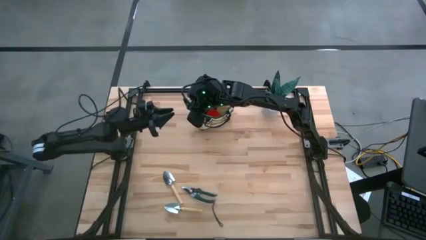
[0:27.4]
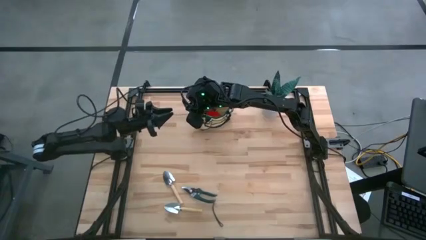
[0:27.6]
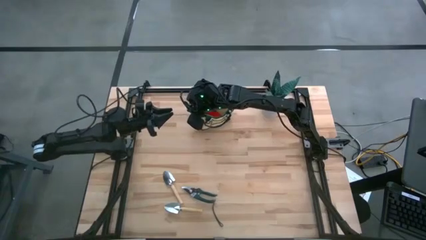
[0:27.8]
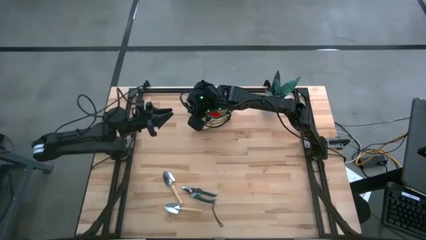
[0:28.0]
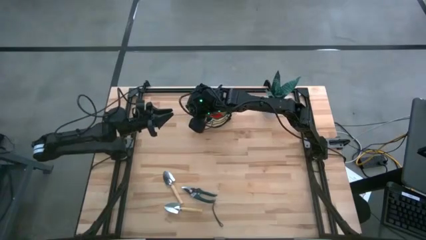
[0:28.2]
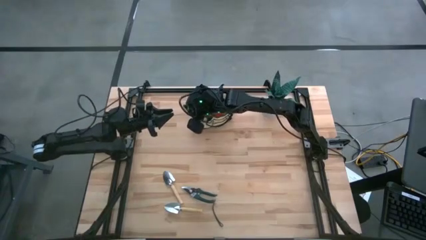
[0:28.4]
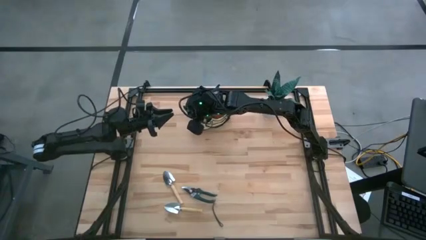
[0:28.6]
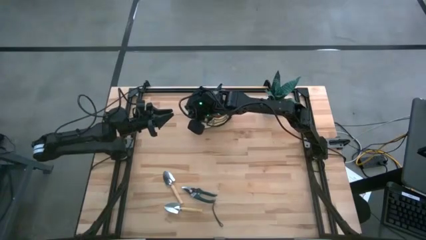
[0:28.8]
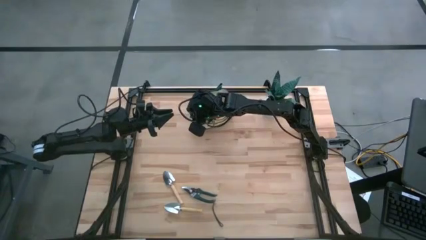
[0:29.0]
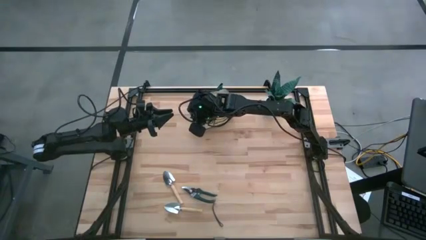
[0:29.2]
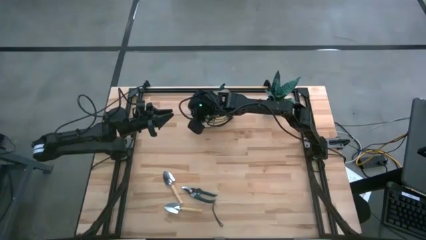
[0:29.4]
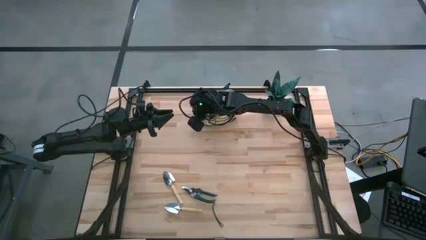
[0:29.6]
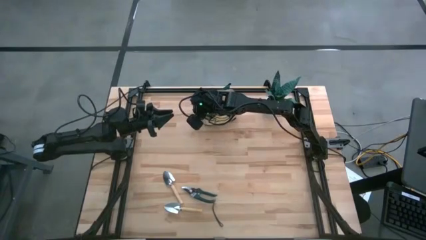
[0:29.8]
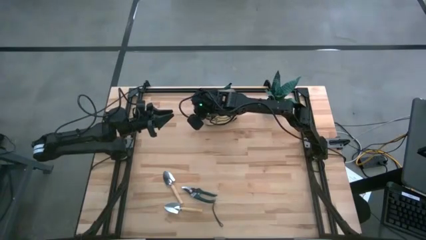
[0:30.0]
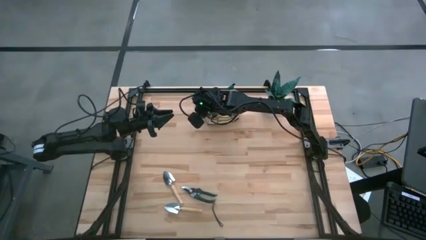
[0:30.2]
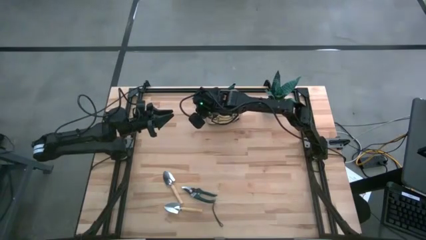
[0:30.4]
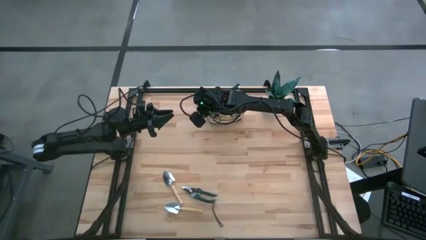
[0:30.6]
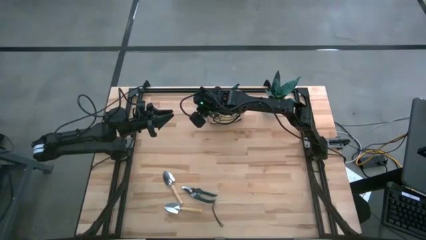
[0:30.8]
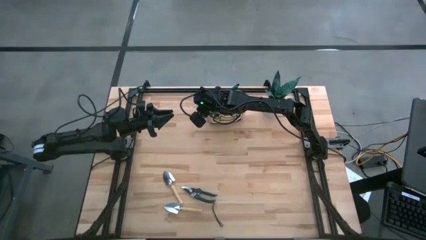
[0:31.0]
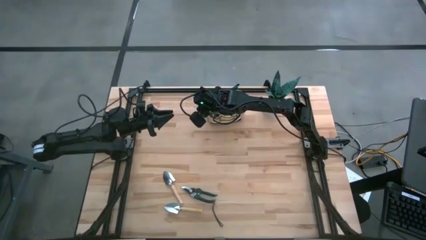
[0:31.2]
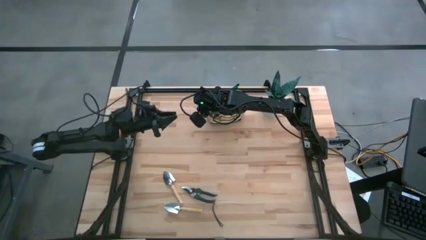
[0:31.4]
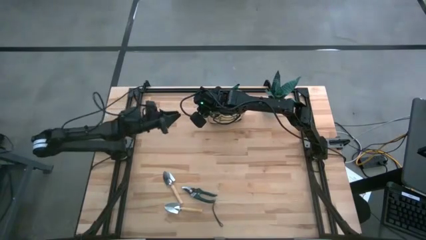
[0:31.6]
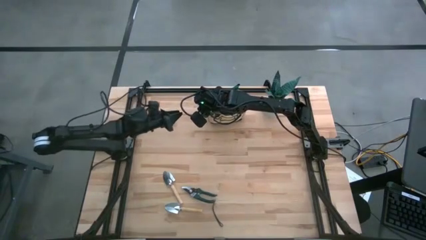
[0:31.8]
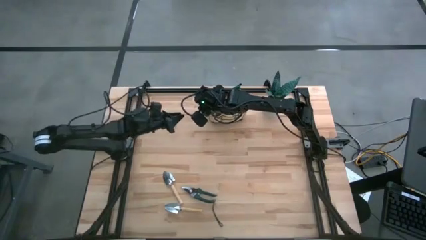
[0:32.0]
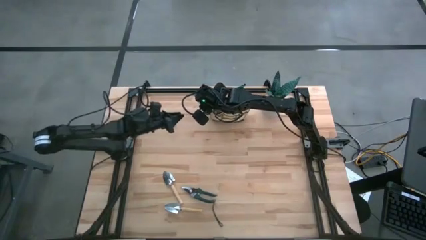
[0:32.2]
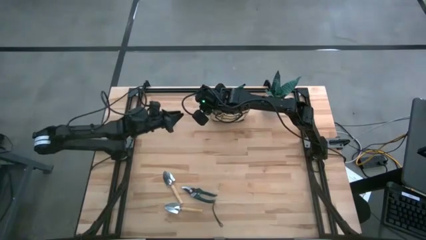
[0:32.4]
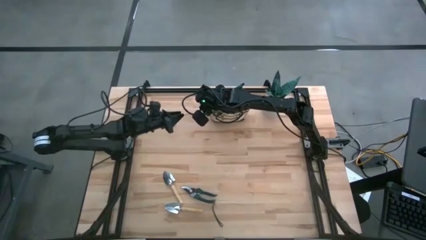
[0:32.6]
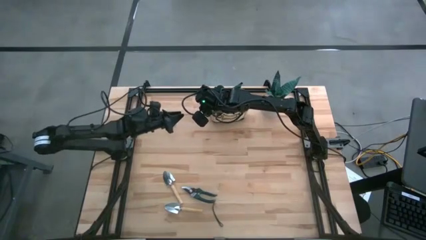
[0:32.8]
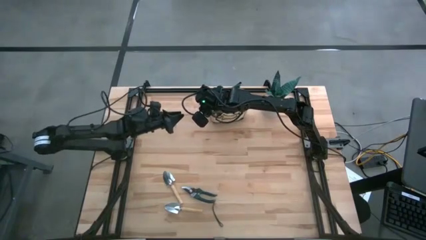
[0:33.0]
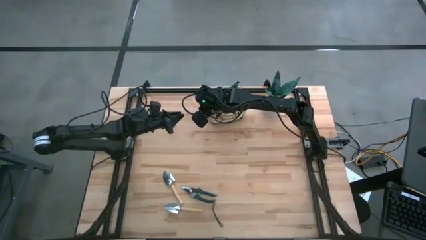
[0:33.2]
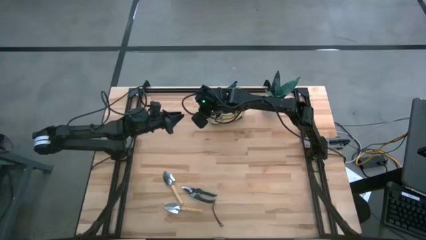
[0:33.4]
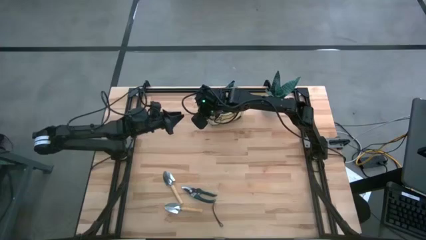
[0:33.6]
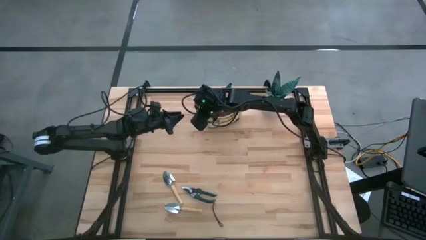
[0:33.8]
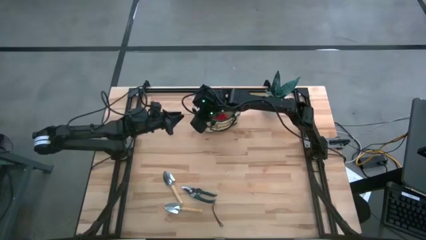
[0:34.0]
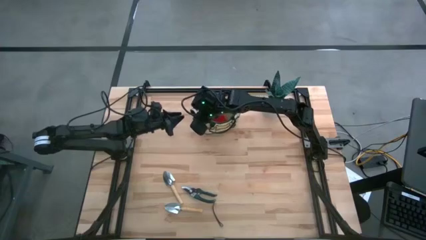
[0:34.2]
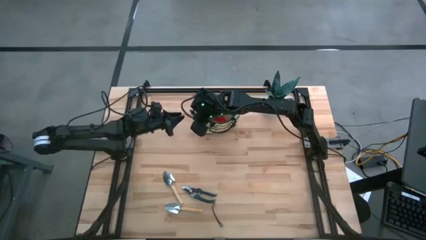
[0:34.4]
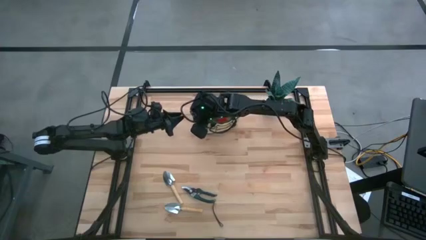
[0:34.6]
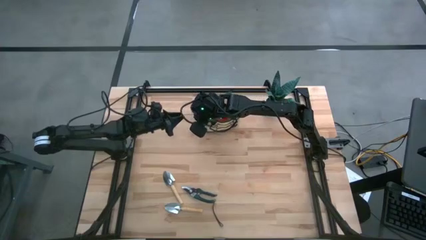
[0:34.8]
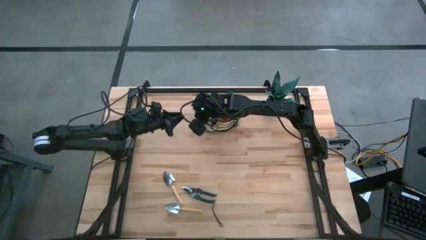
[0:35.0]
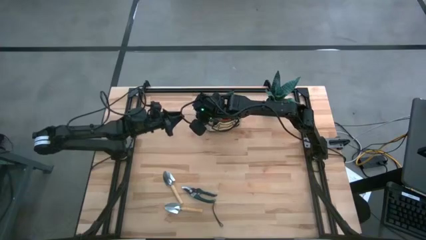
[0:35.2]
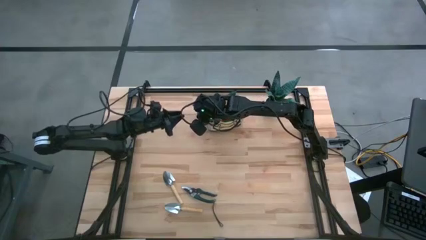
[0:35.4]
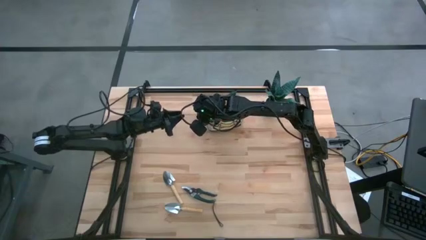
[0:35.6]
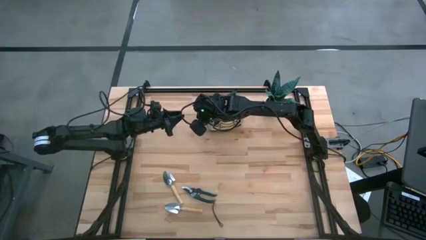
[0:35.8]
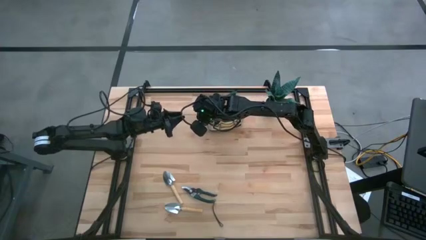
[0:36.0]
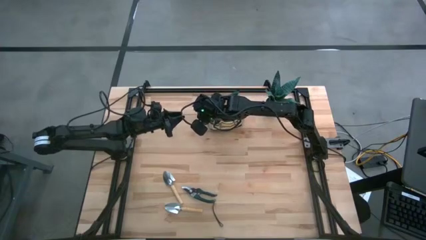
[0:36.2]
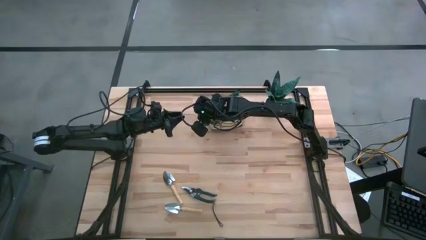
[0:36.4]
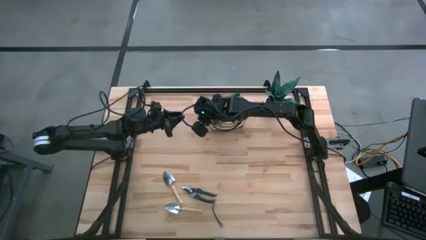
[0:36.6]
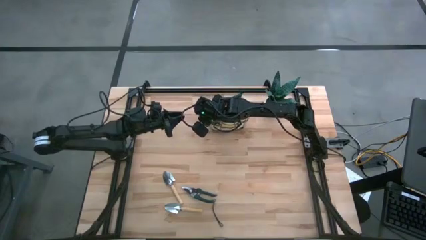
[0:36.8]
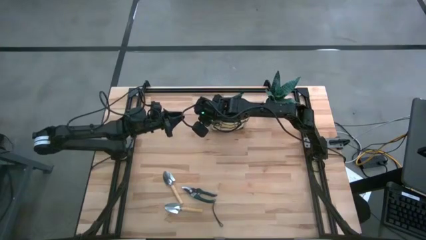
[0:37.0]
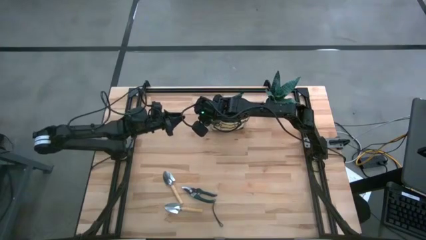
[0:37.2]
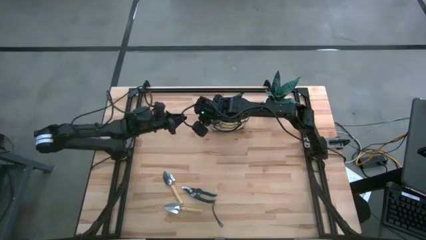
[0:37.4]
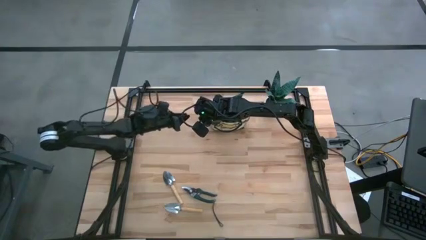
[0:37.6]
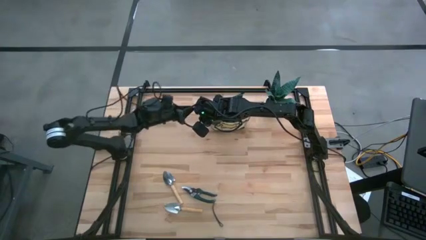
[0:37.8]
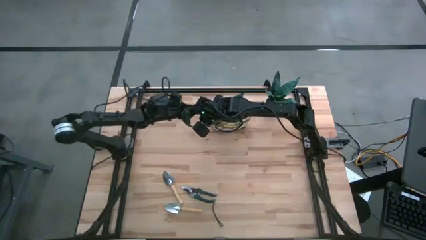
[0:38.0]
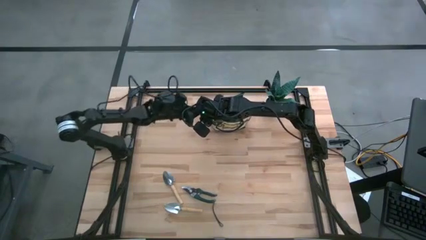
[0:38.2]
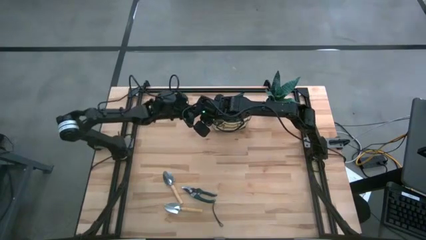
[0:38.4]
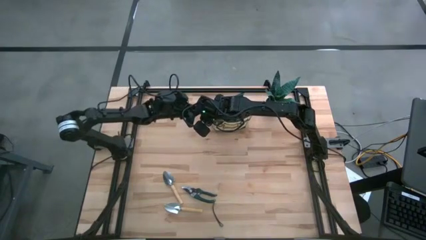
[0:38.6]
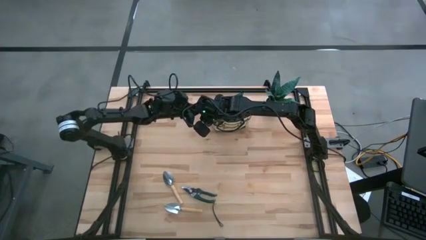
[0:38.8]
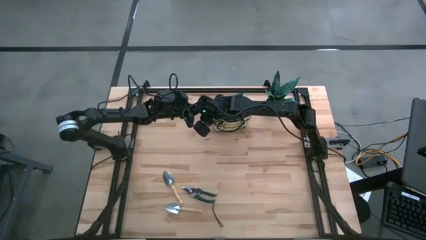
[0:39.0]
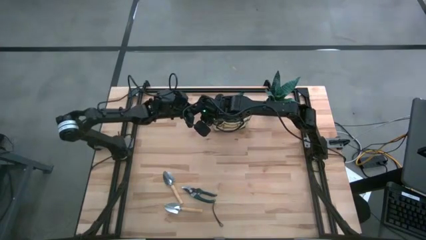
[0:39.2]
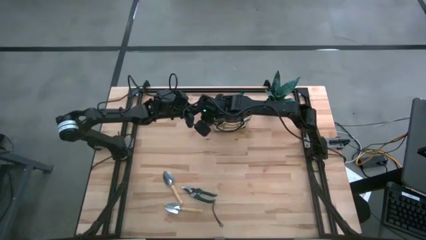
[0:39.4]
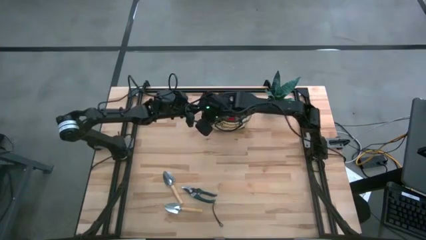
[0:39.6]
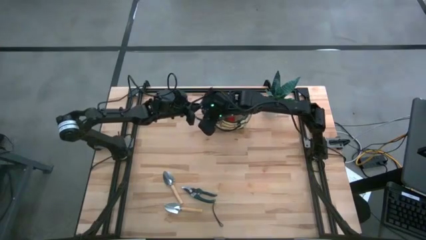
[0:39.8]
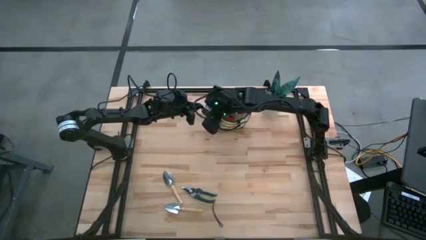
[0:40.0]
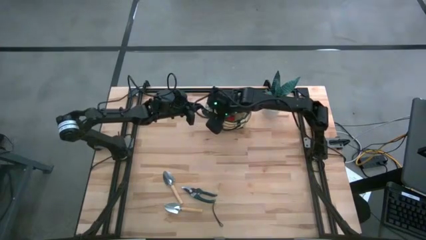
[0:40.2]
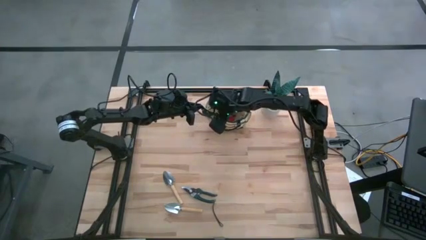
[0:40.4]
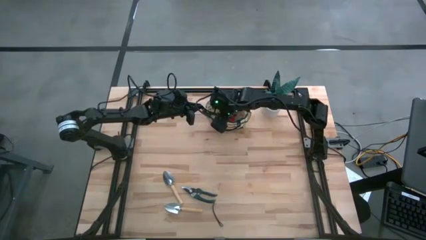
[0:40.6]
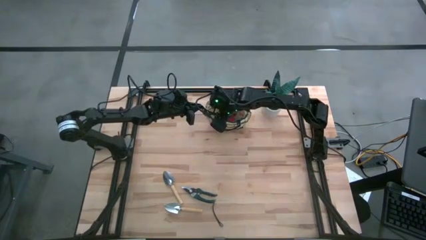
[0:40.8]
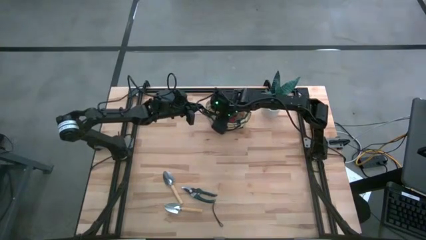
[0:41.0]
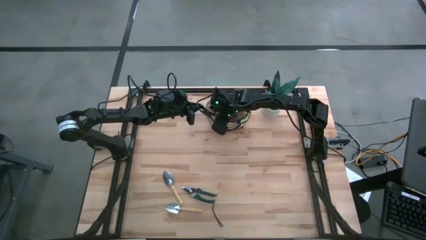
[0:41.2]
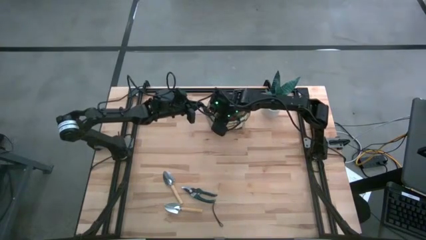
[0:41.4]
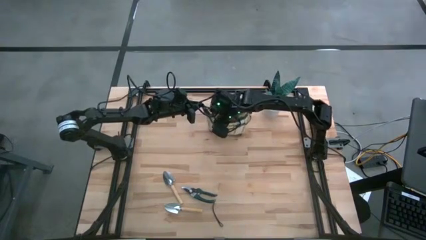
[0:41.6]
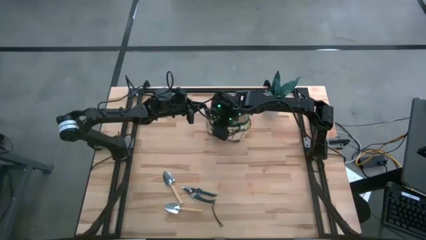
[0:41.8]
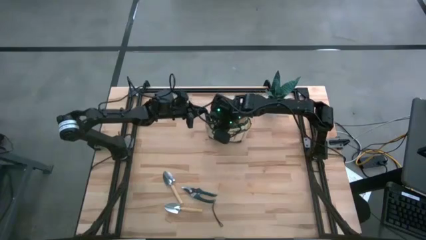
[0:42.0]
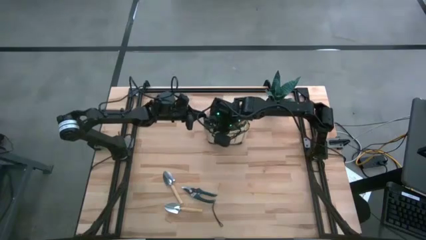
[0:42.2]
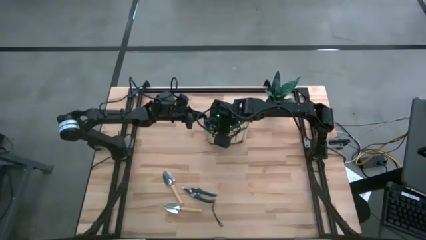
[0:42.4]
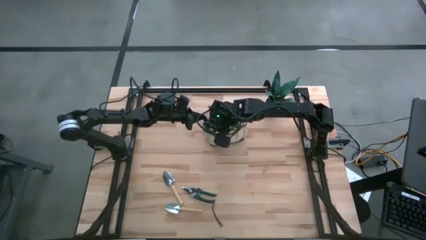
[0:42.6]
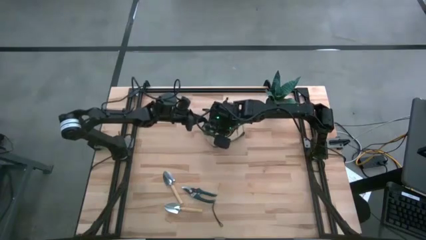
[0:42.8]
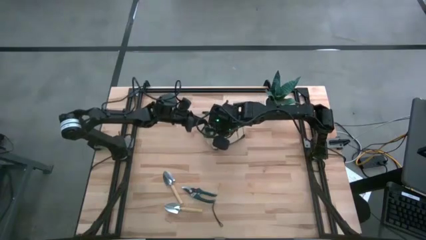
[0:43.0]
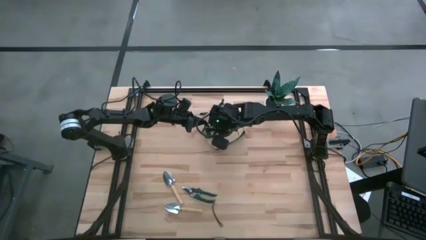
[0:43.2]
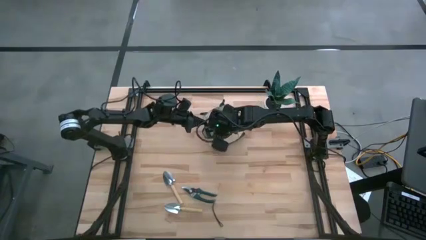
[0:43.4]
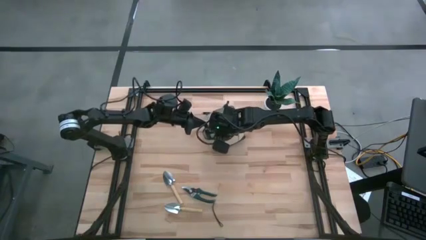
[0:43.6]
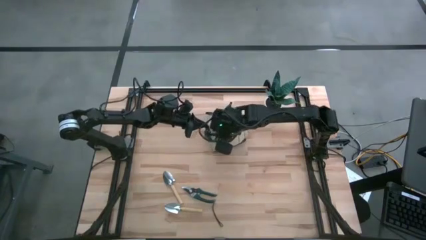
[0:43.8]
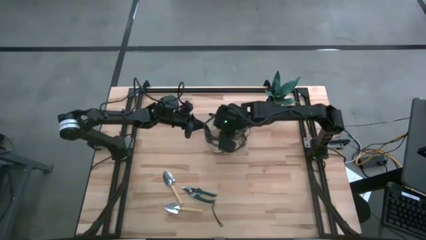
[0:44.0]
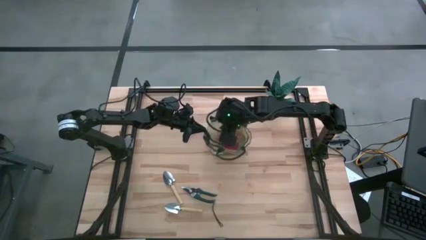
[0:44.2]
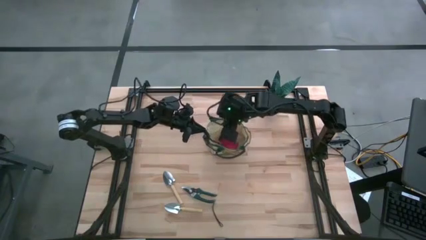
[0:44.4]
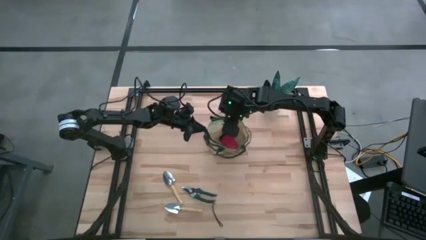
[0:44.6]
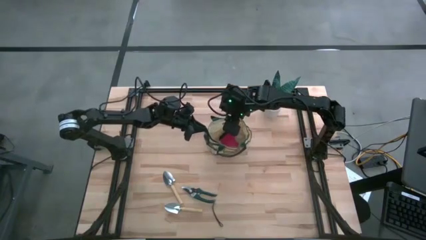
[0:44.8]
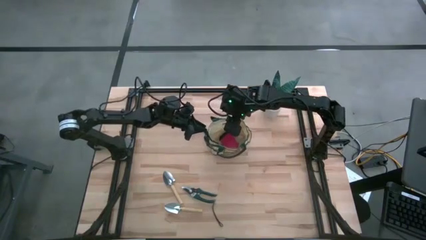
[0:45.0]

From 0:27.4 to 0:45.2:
Task: Pick & Place Garden tools in Gardening bag
Put the top pruner into the left bag pocket
